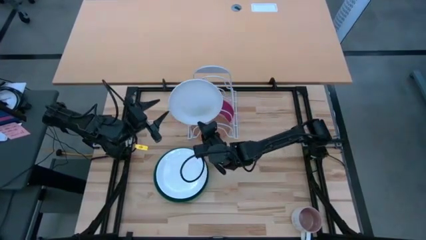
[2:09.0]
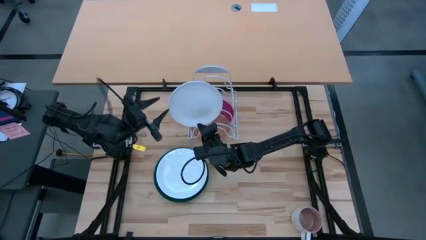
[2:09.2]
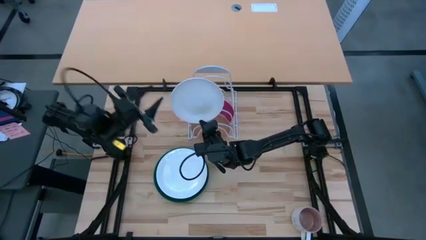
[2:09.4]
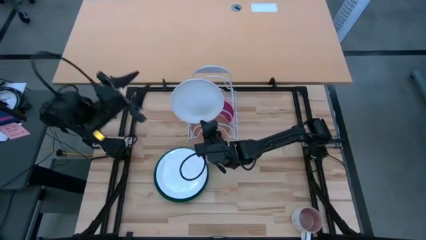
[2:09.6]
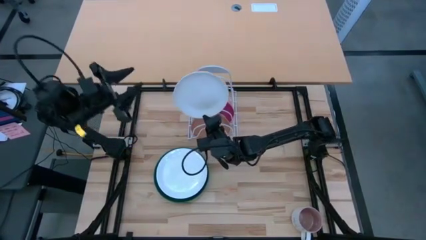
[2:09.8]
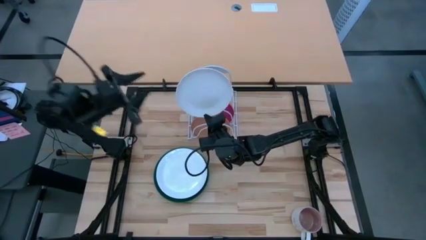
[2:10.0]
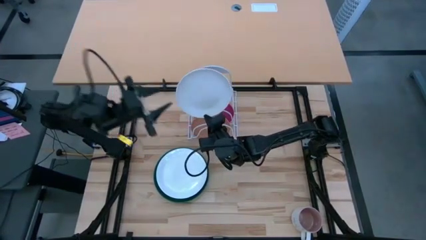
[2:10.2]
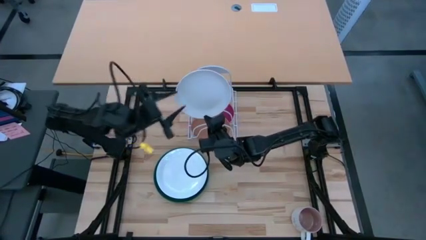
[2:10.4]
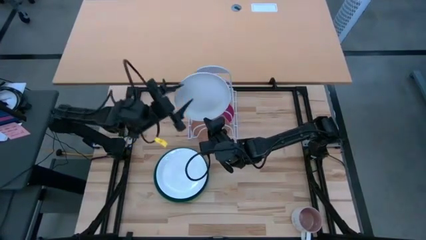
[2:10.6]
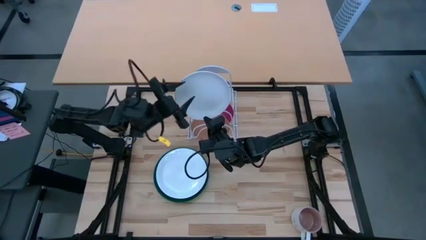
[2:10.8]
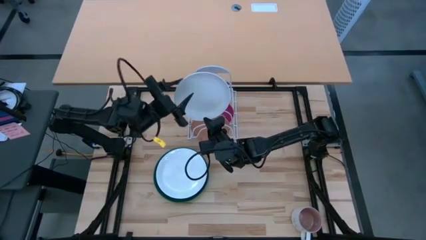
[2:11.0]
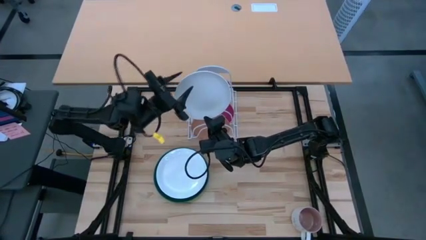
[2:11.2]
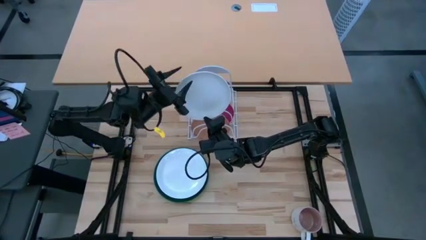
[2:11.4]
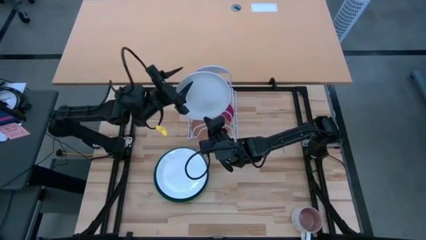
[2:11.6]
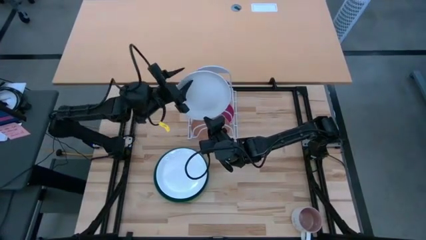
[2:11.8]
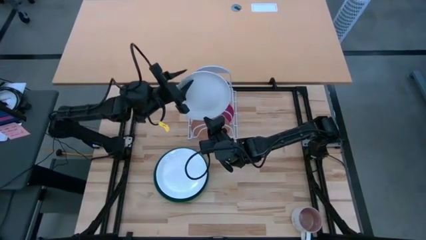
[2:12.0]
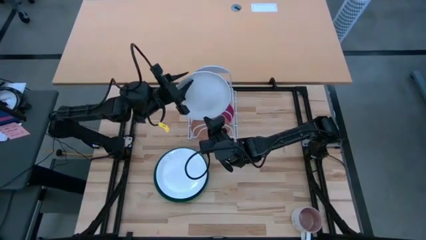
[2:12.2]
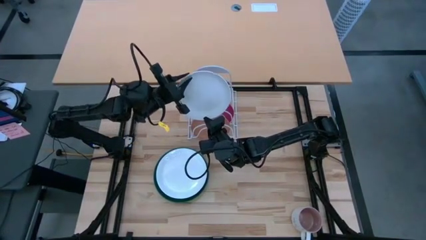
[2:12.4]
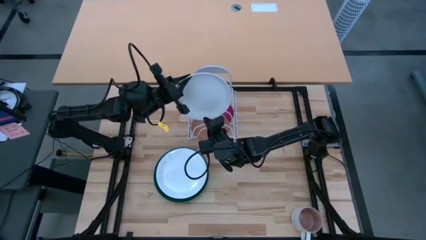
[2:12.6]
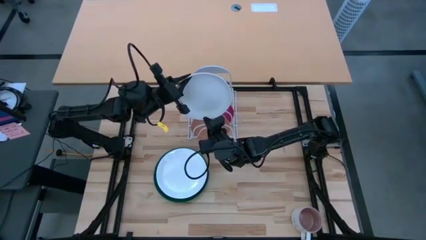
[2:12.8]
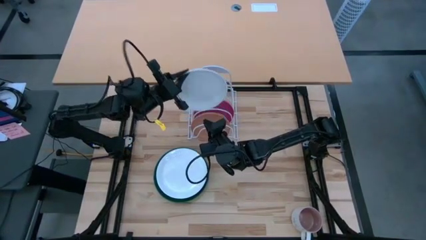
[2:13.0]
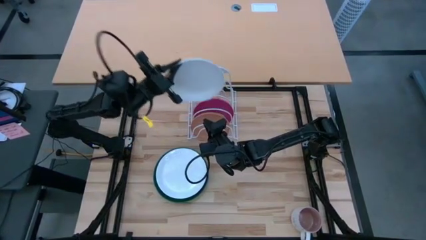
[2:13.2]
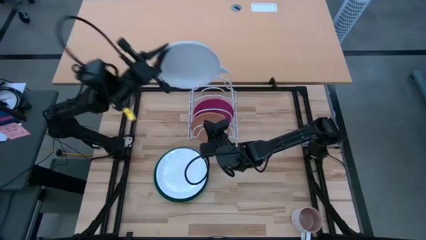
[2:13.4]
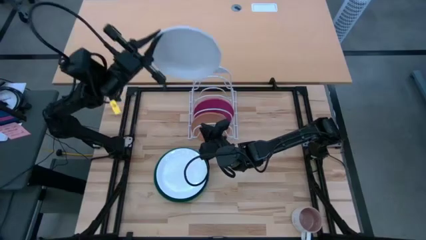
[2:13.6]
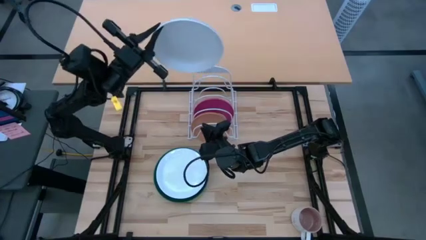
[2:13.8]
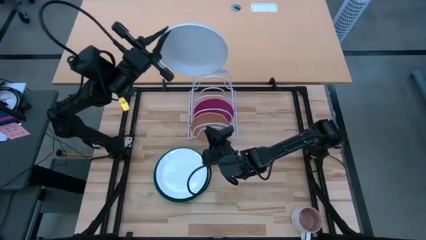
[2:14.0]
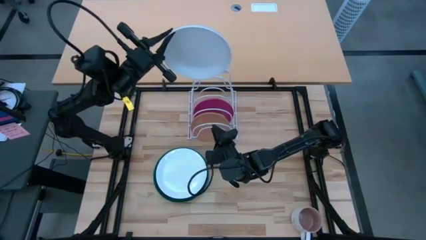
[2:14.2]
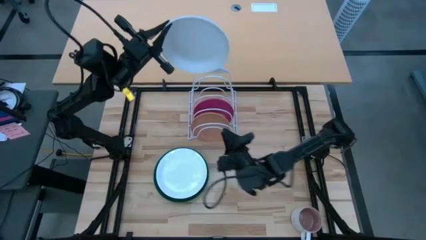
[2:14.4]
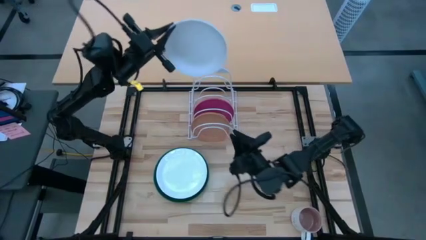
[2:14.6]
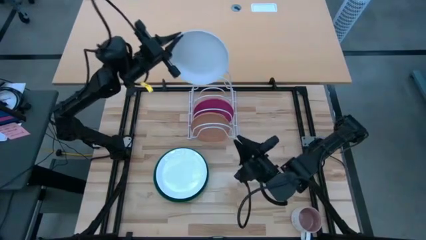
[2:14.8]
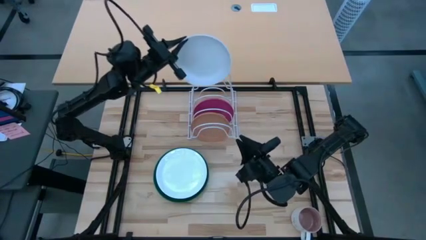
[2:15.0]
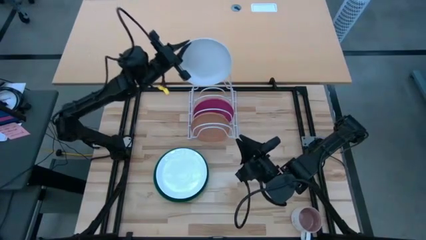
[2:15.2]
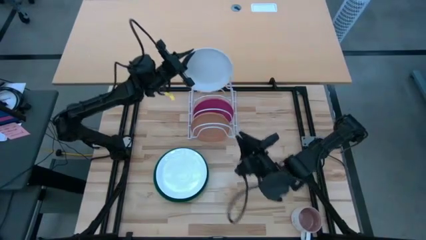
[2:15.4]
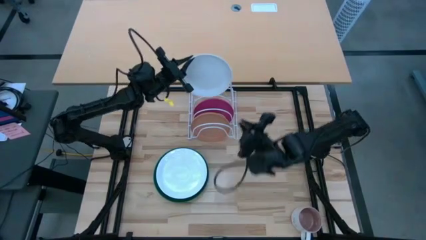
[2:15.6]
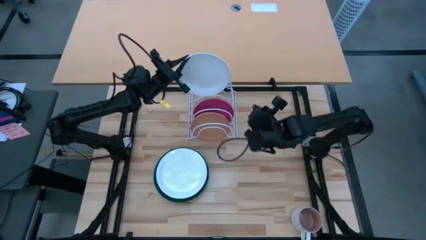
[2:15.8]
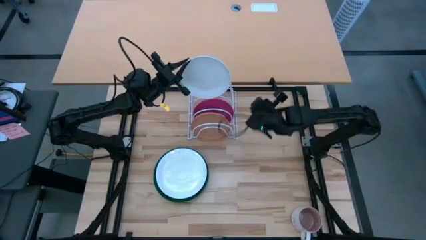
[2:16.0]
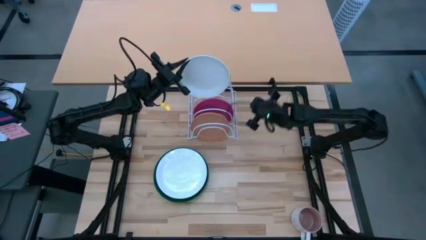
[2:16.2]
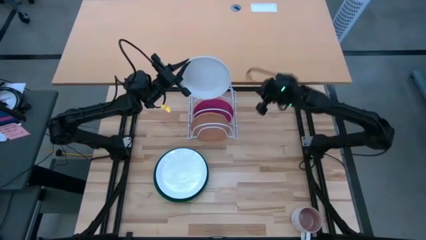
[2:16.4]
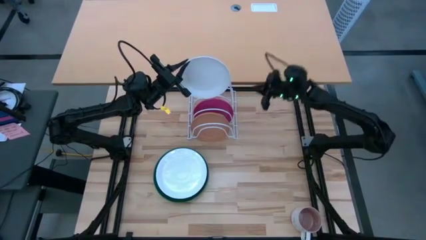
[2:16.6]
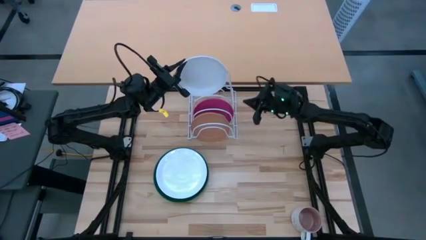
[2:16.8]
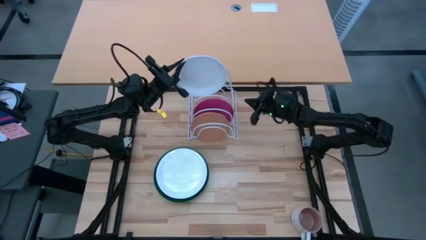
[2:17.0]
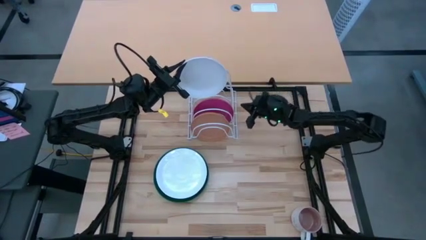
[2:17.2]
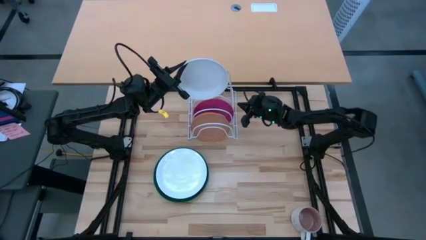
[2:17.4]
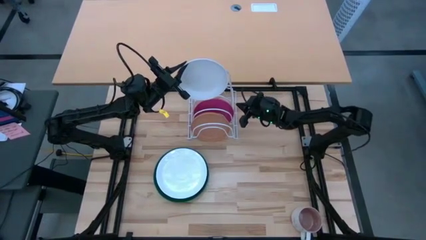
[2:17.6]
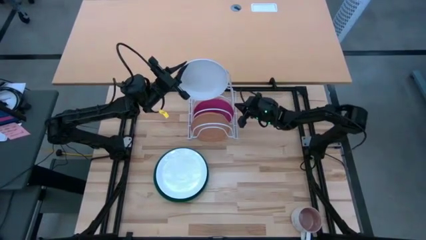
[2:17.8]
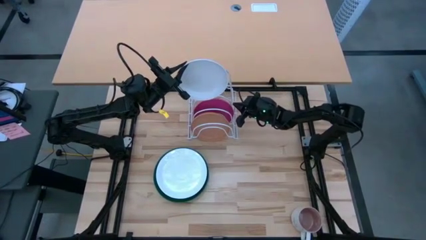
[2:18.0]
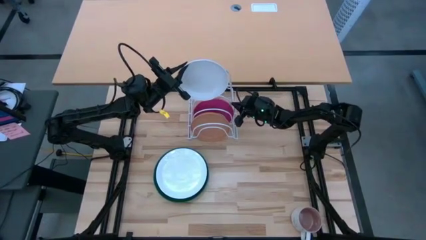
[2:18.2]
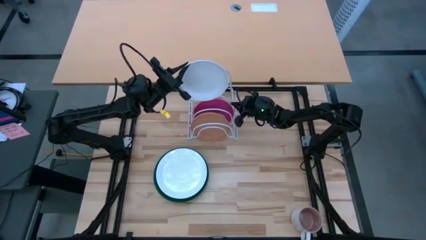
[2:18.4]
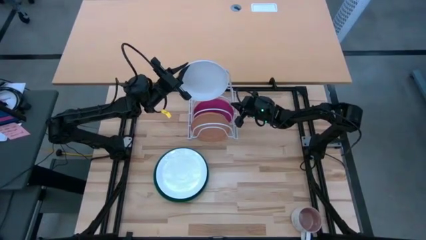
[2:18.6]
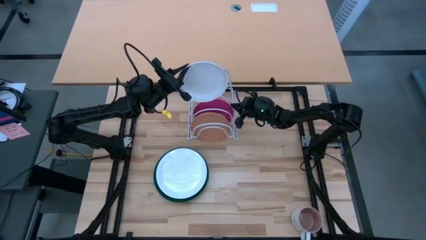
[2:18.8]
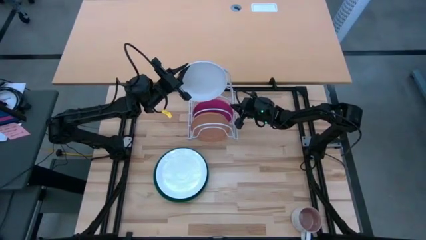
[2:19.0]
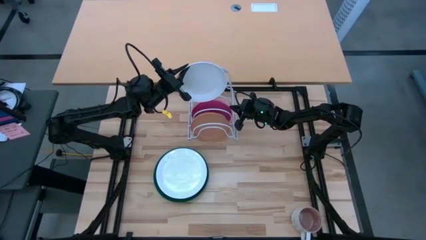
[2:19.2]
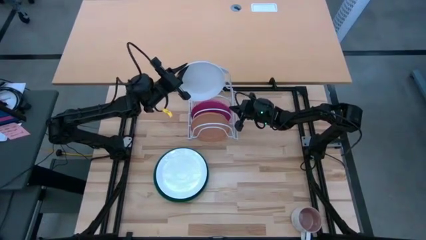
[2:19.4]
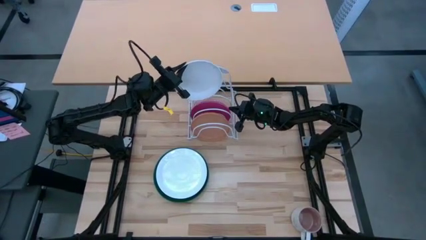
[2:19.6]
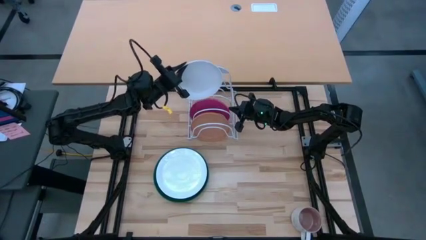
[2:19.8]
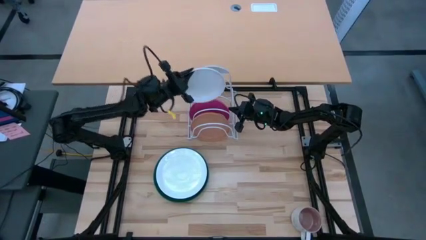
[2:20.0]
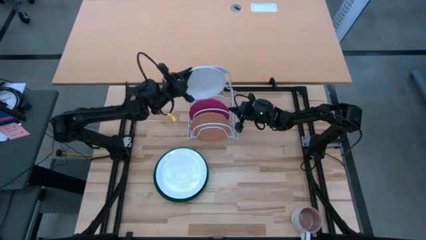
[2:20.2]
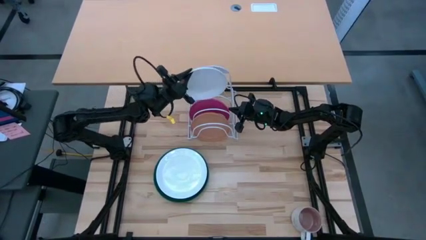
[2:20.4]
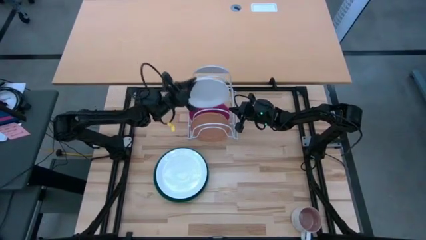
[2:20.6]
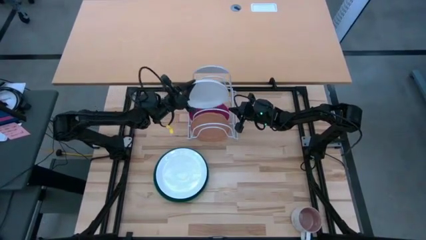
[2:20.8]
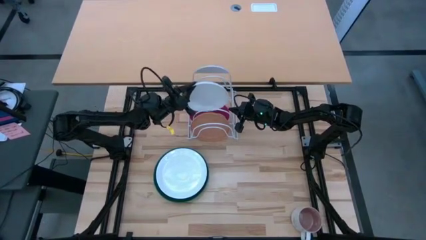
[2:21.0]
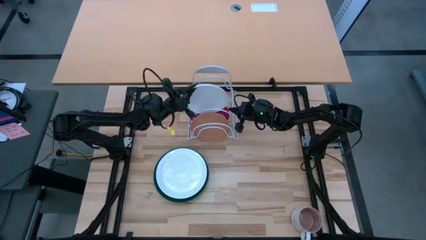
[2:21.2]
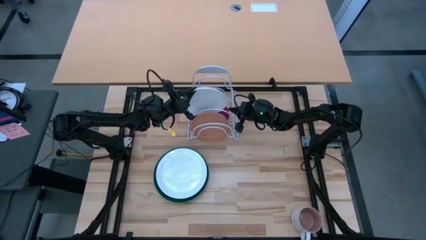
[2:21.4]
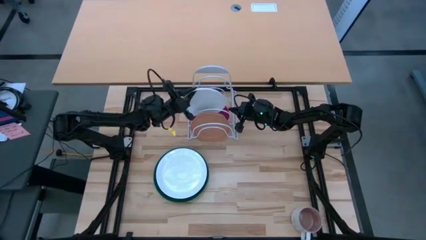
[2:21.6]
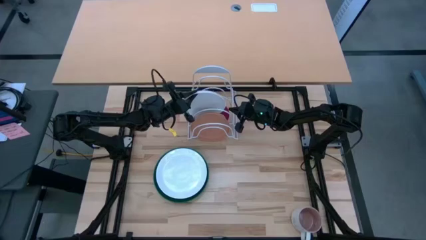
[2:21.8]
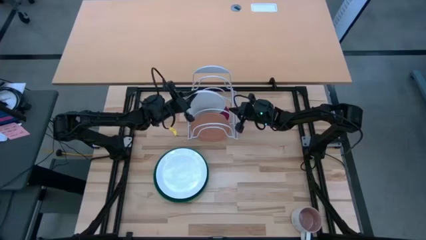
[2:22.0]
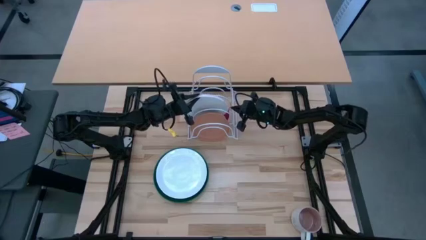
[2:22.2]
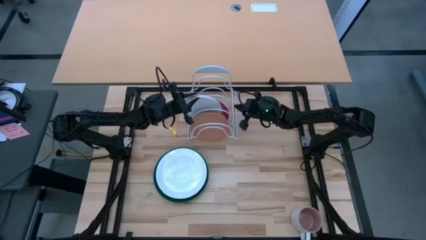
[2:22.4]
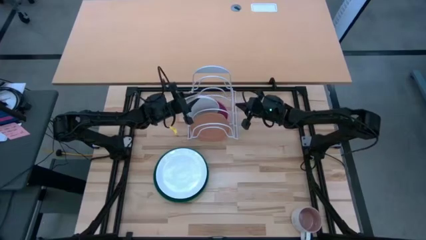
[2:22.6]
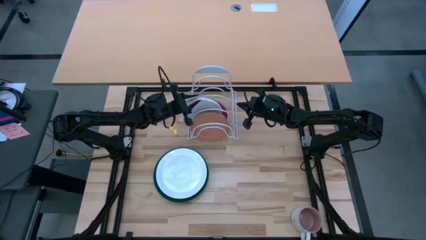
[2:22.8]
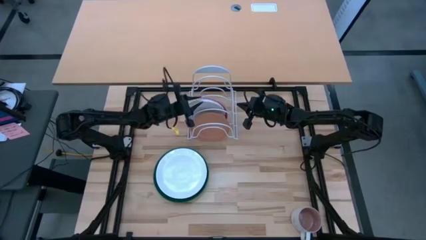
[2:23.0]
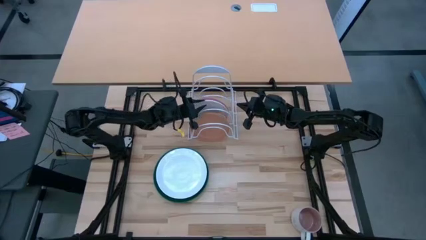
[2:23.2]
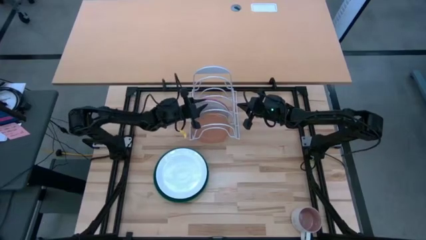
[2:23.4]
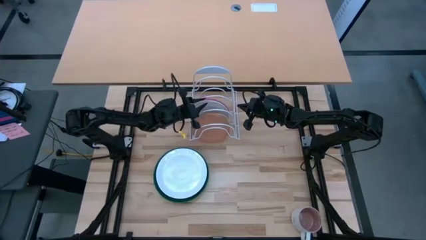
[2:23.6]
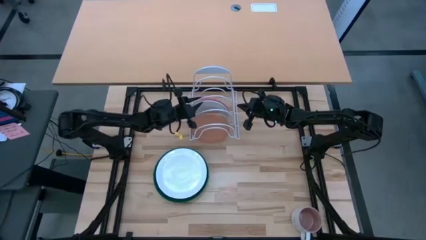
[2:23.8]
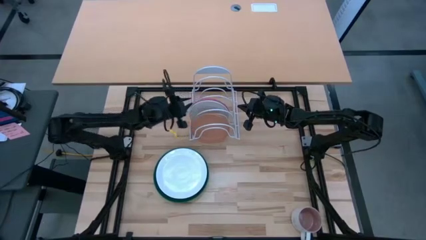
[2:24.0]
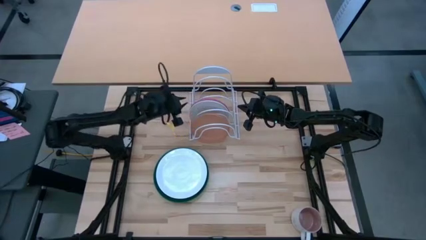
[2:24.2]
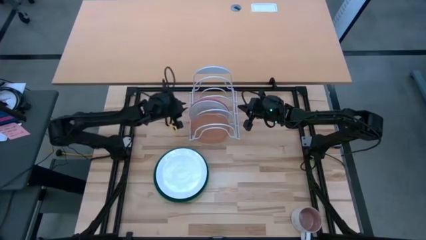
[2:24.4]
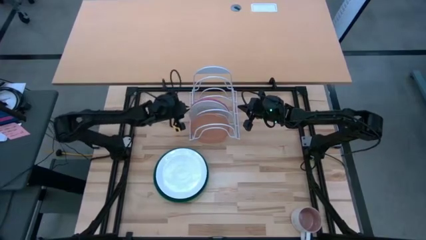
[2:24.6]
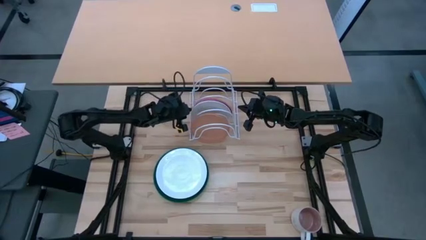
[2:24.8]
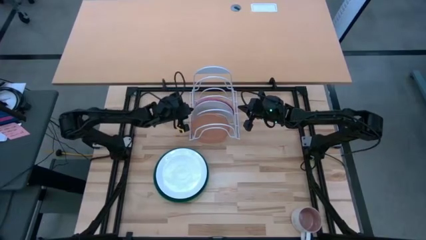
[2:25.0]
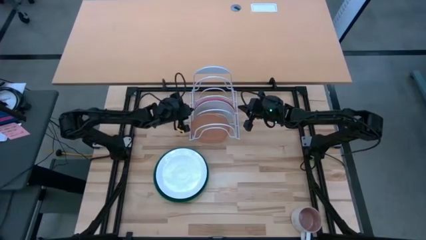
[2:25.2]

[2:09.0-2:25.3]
Task: Sort dishes
Put the white plate on the dish rack
